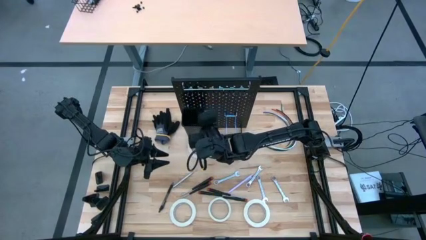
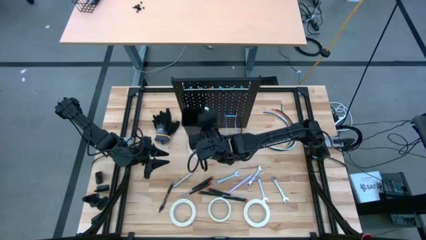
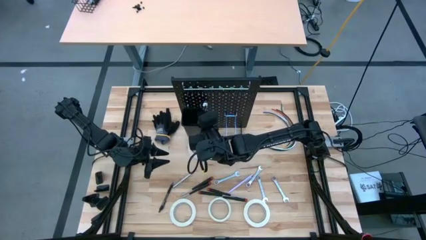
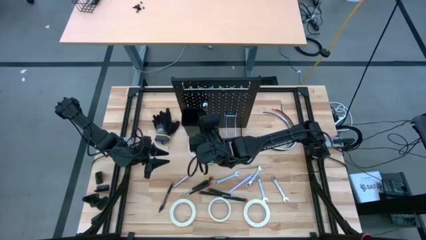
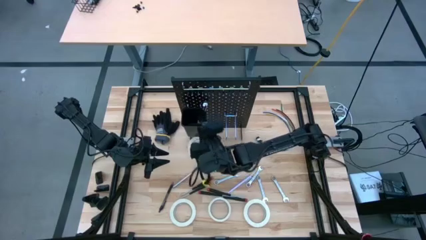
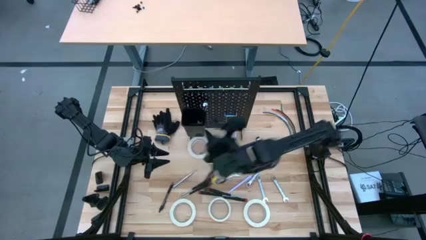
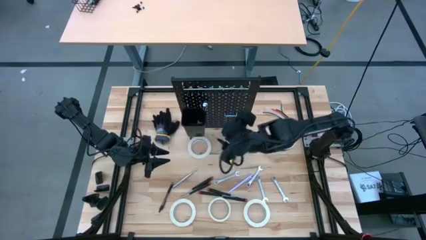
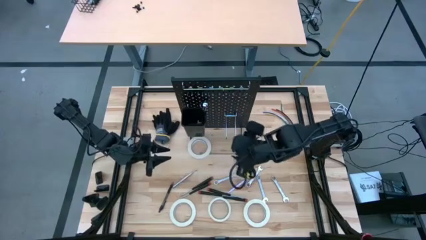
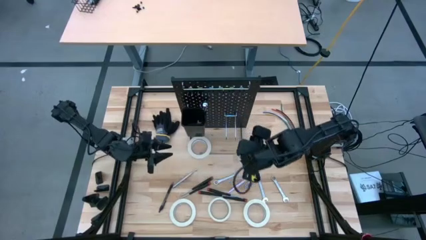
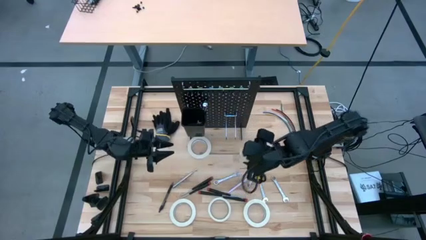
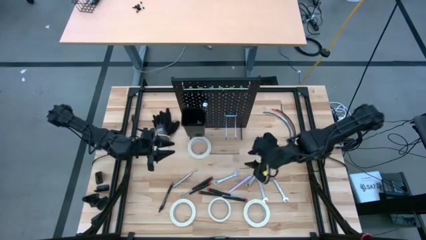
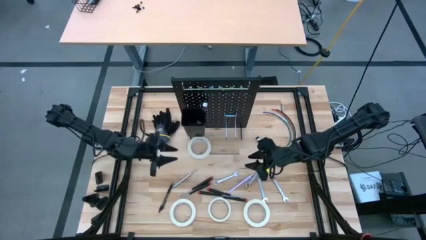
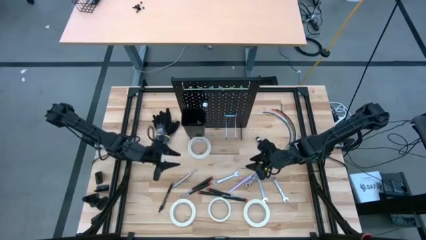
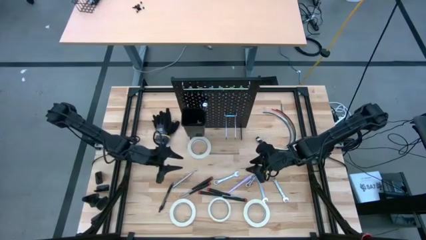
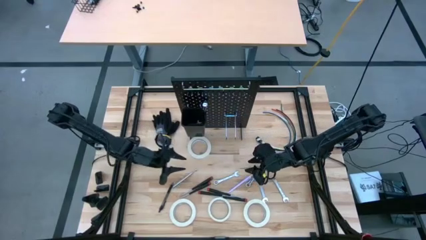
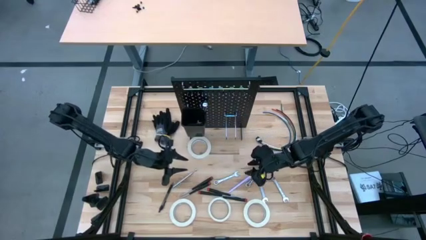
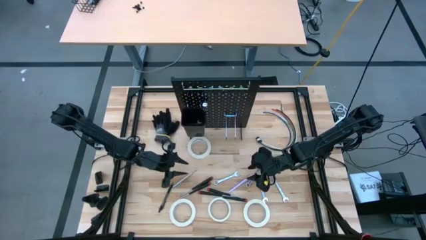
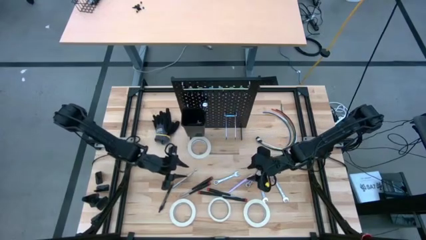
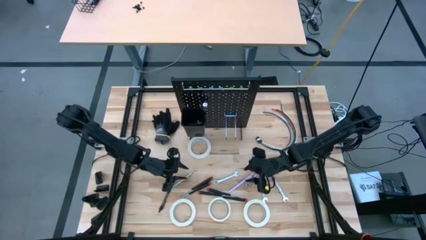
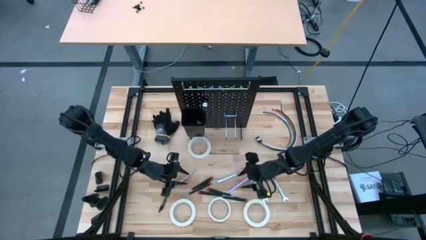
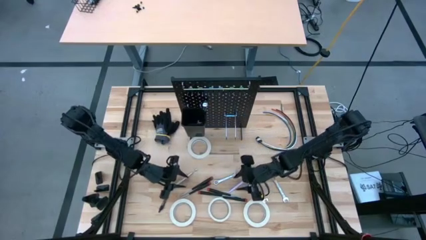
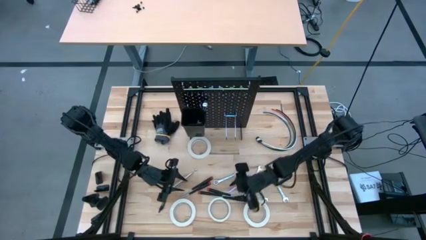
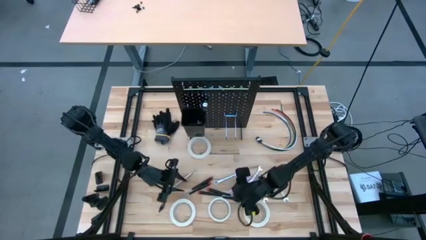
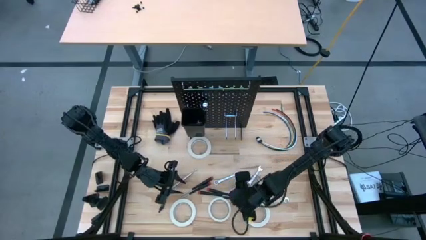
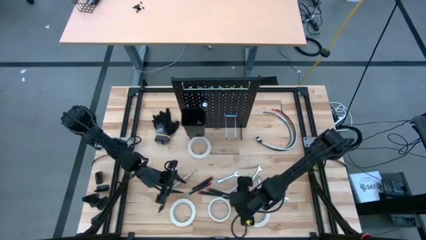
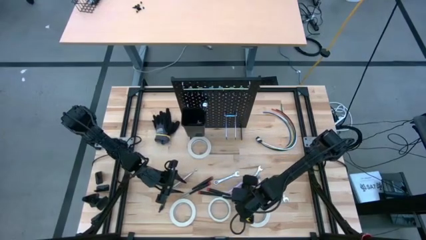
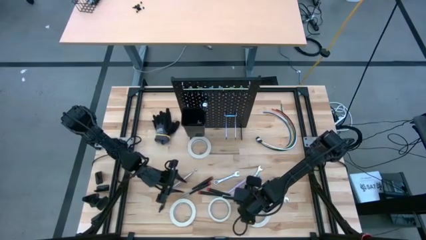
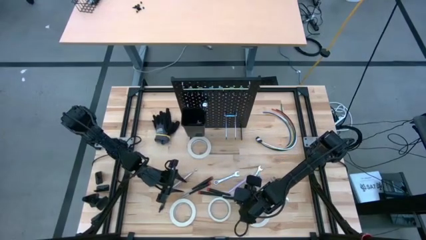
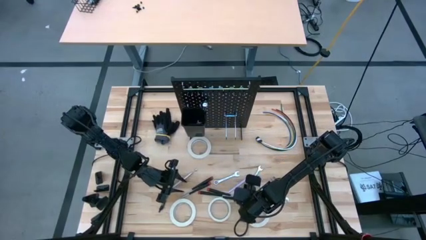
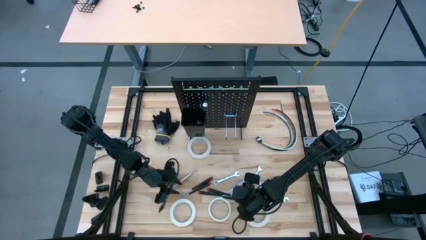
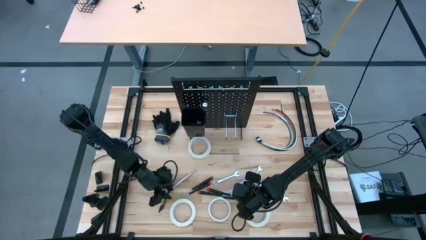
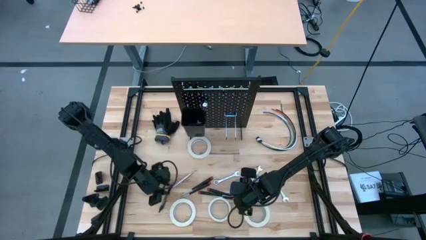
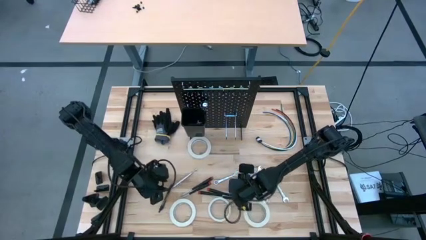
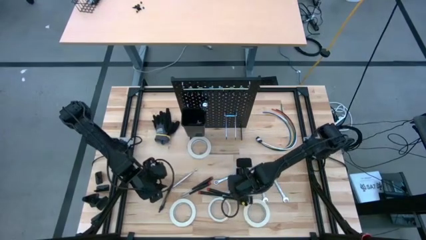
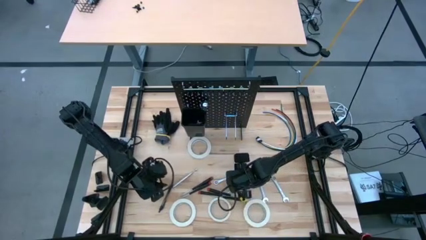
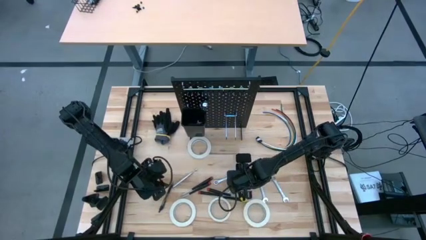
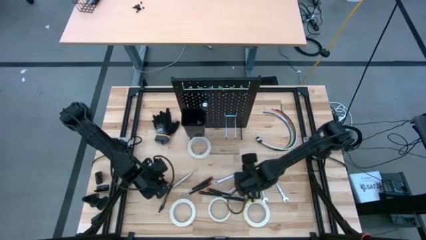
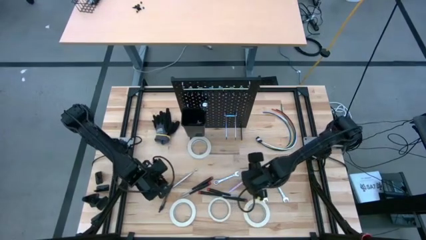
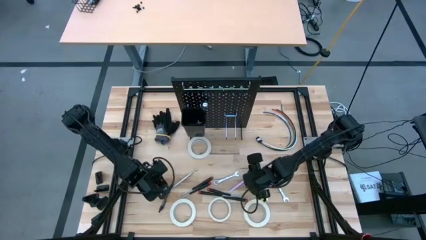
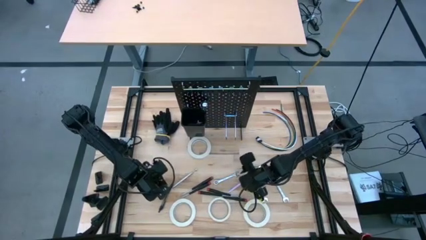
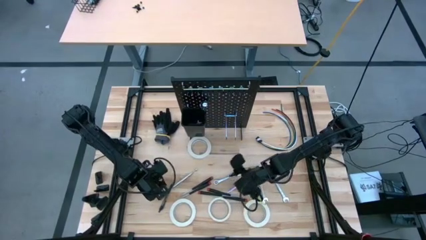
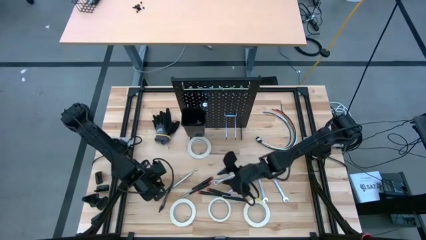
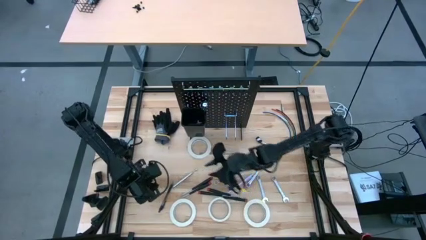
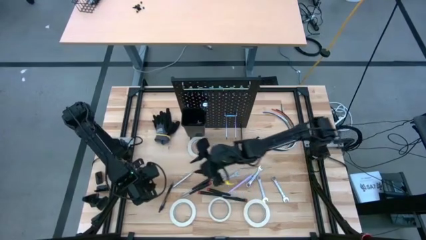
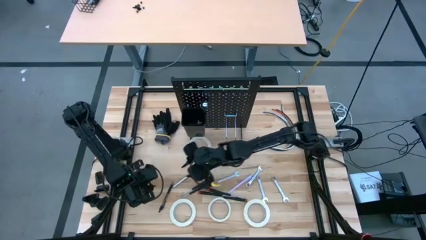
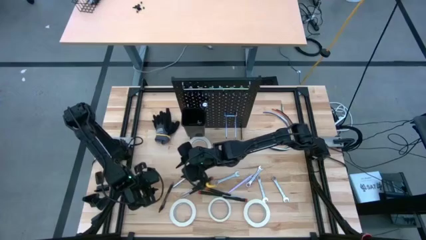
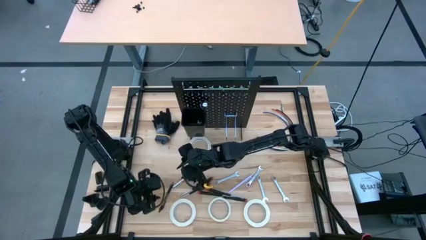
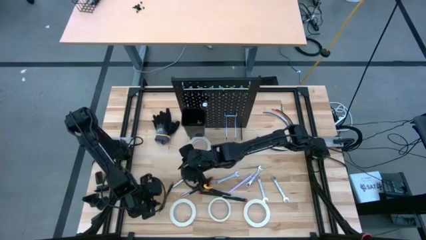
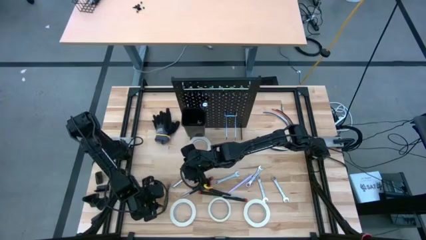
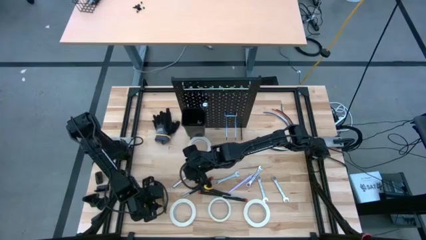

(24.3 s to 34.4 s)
Task: Hang tools onto peg board
Put the black pen into the black bin on the peg board

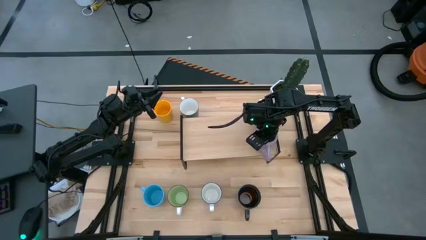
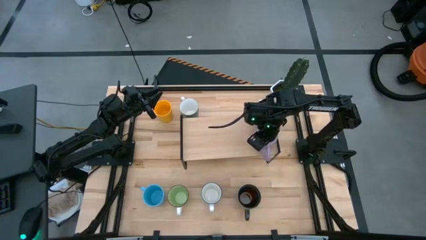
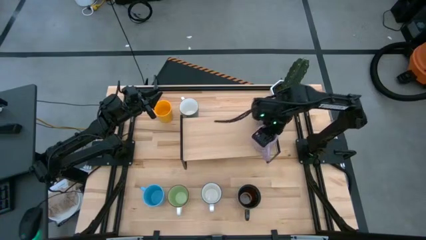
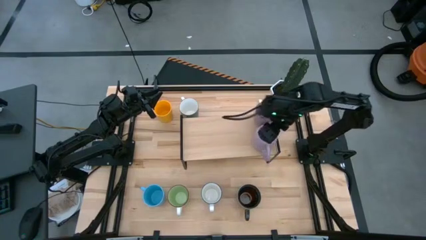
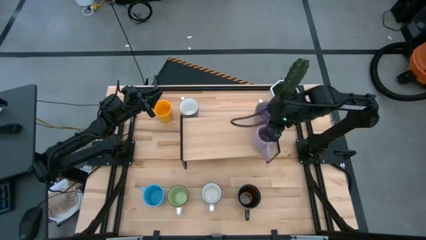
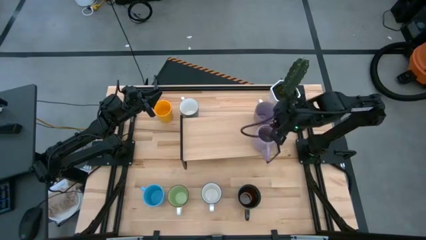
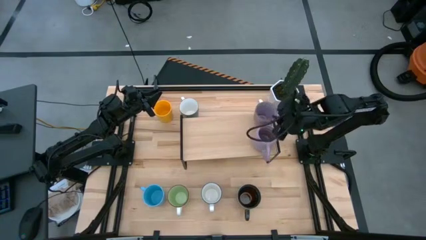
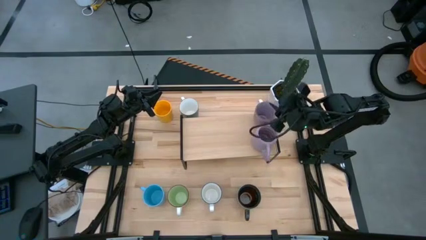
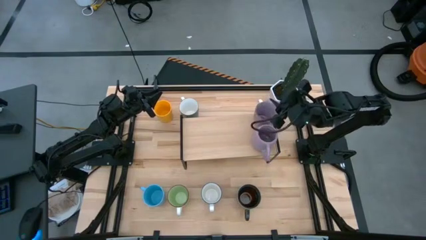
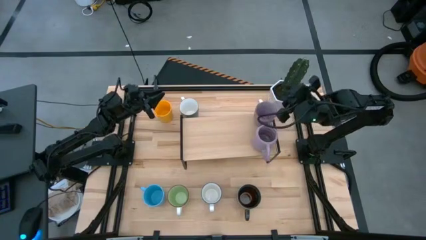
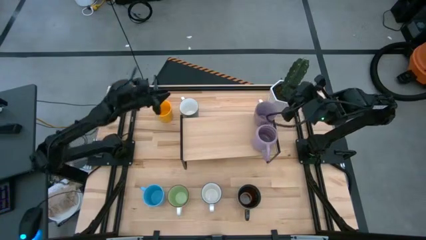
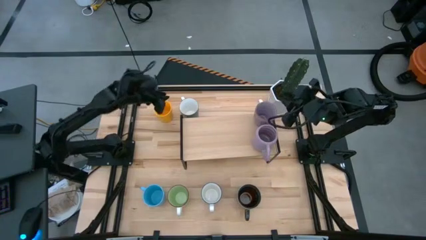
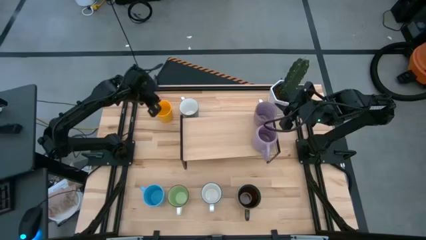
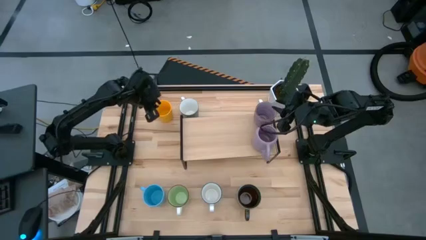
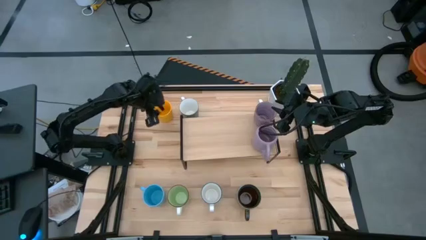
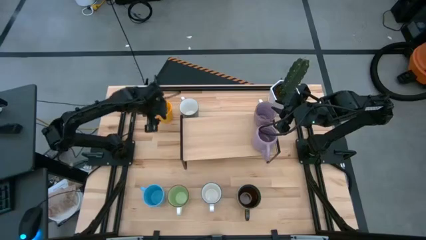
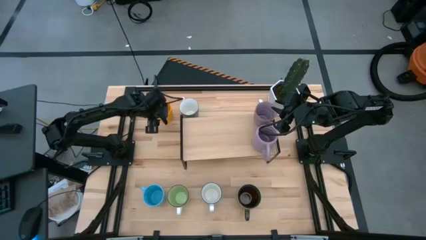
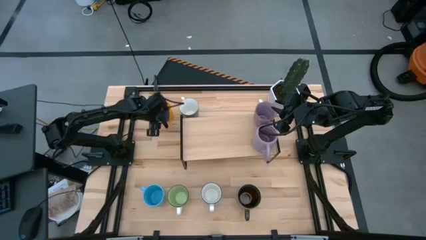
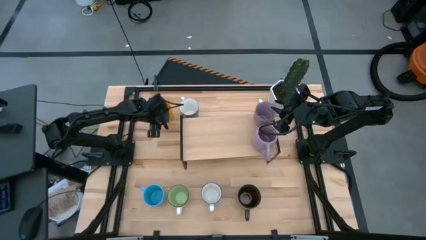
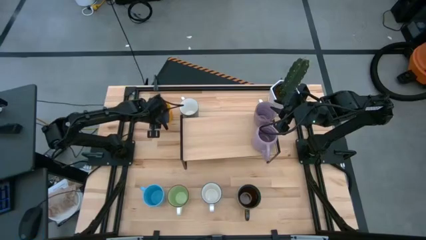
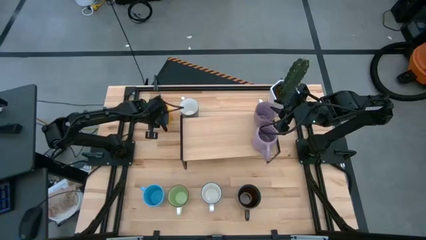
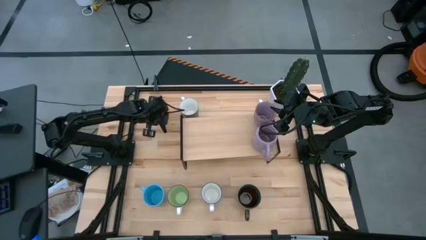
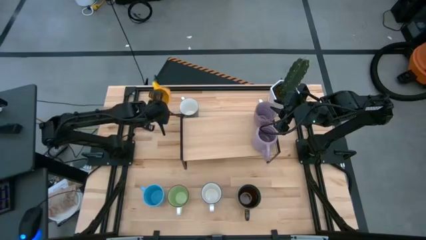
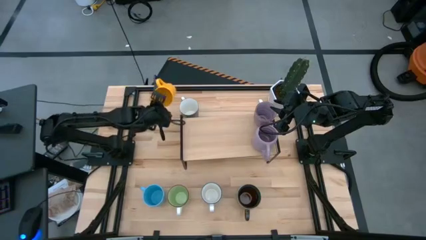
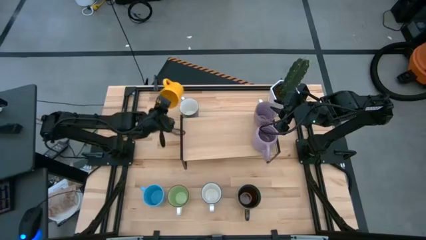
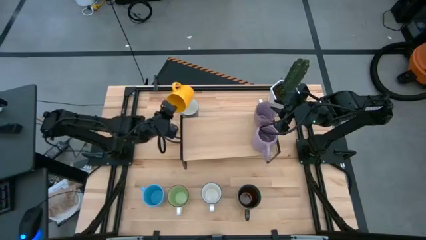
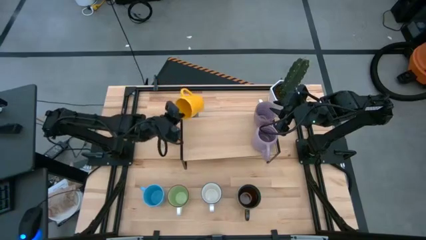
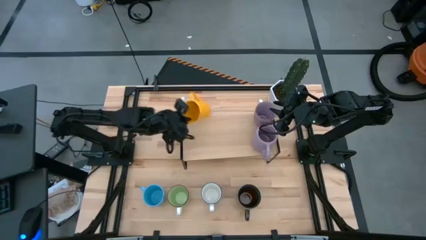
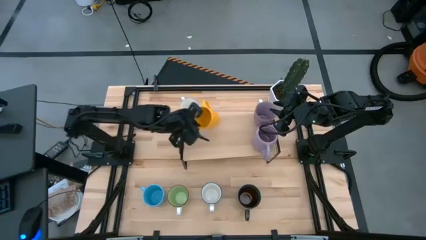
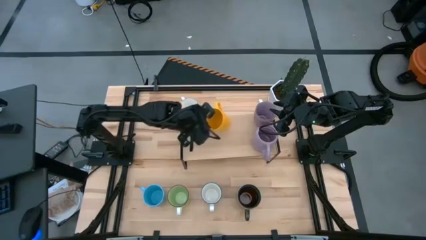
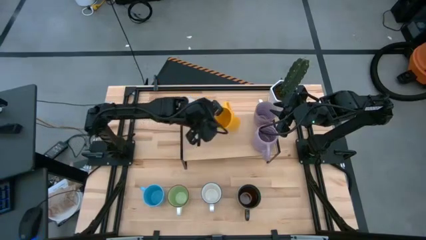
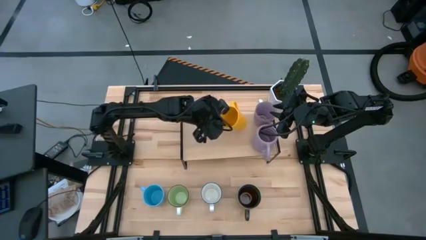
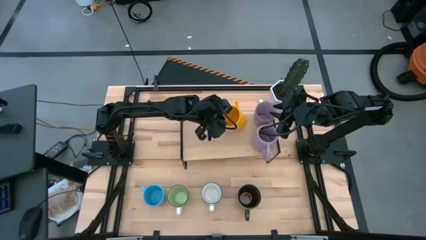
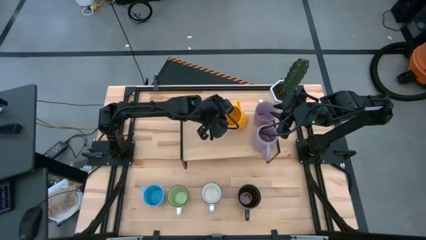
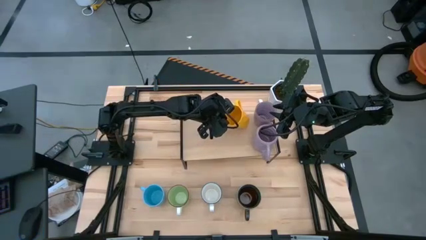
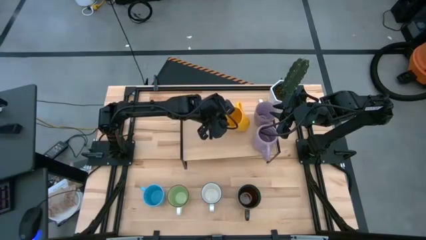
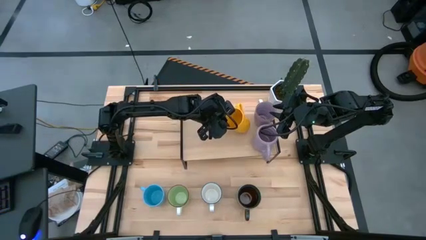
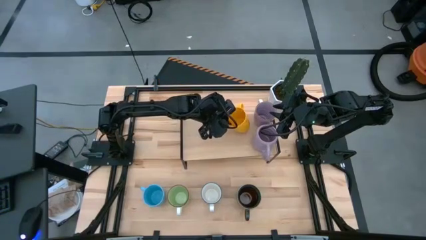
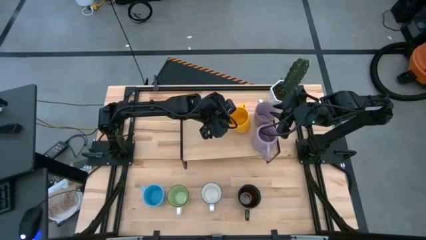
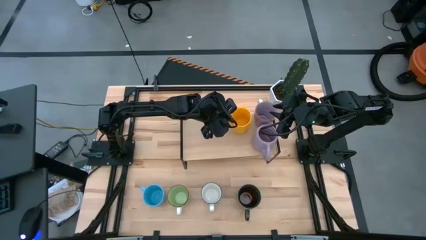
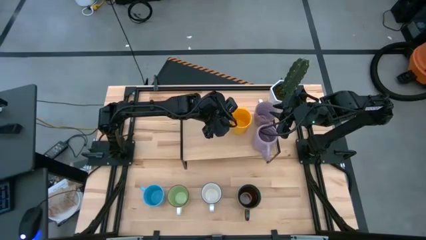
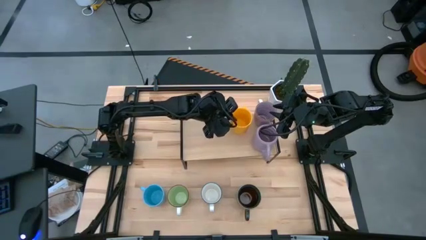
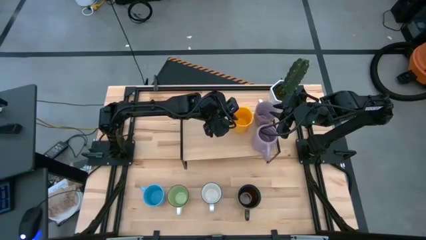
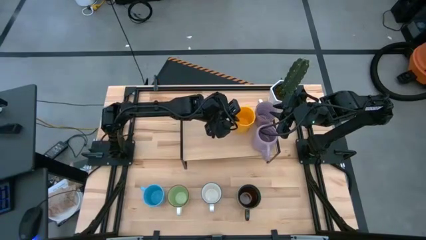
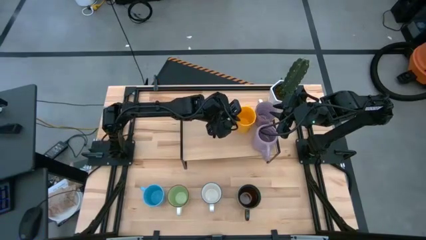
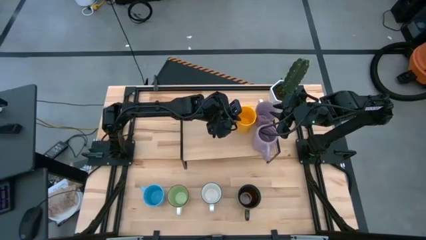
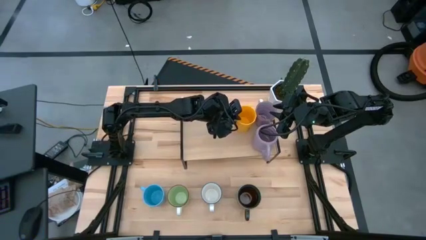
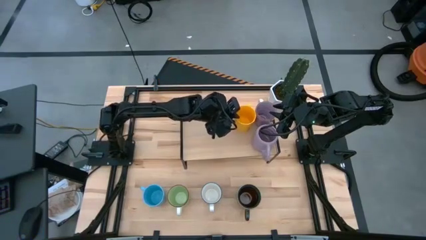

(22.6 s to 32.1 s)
Task: Place coffee mugs
Put the yellow mug on the shelf
